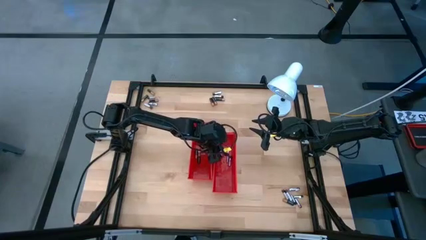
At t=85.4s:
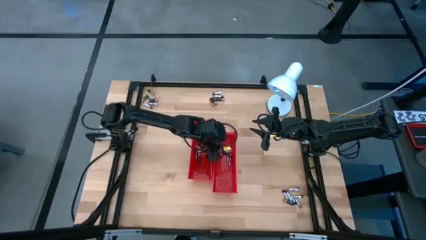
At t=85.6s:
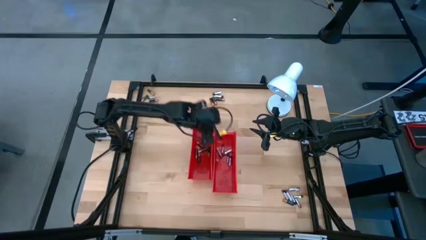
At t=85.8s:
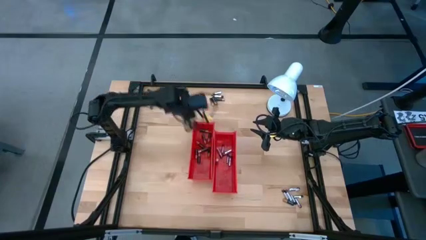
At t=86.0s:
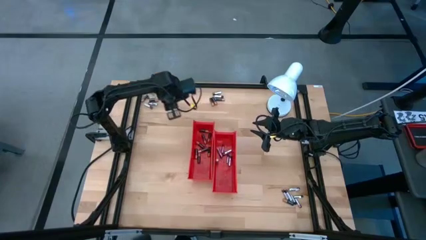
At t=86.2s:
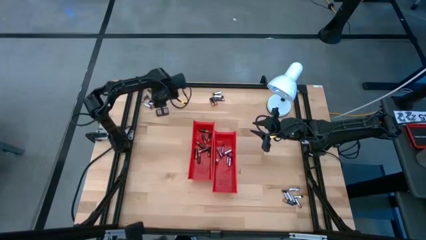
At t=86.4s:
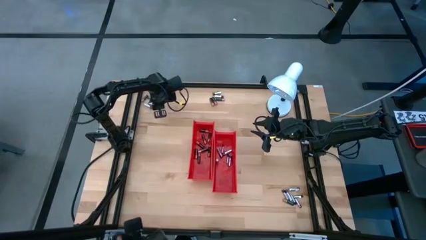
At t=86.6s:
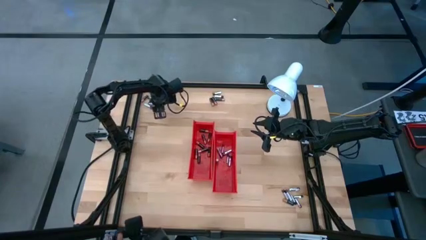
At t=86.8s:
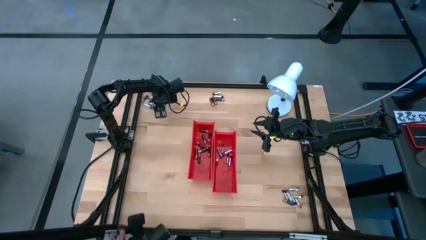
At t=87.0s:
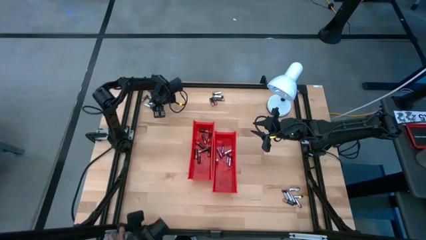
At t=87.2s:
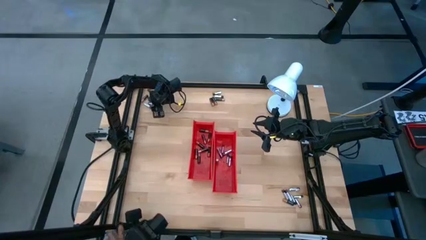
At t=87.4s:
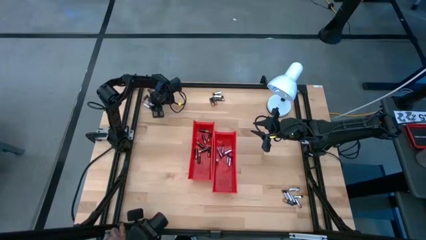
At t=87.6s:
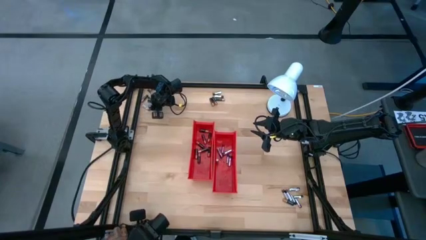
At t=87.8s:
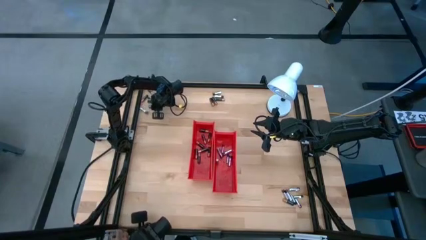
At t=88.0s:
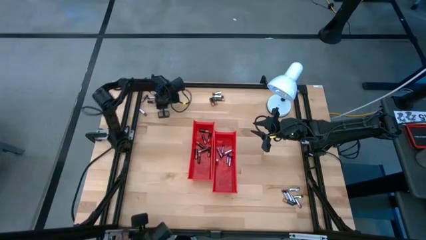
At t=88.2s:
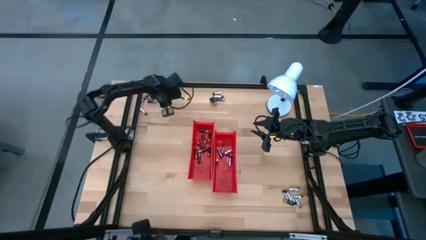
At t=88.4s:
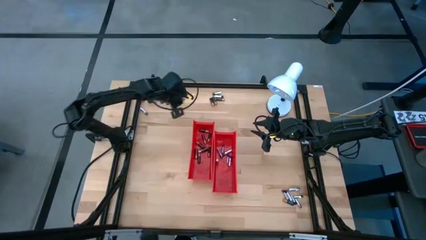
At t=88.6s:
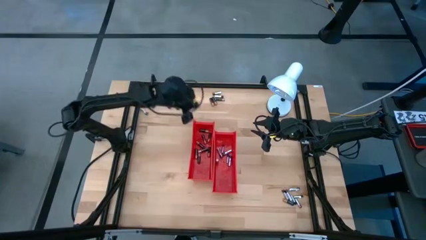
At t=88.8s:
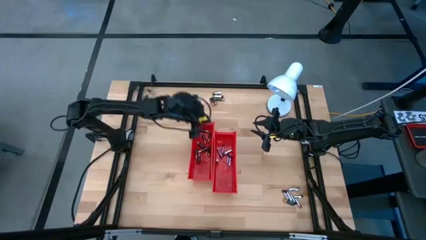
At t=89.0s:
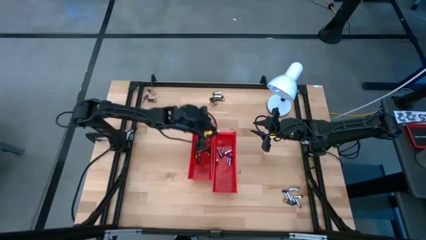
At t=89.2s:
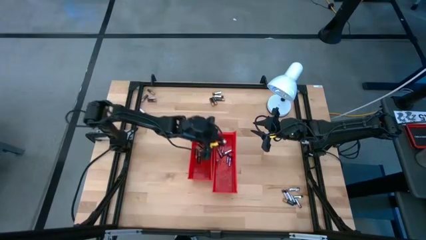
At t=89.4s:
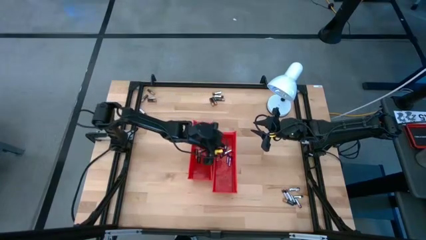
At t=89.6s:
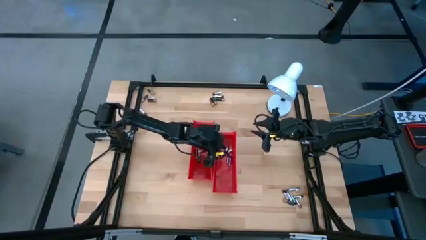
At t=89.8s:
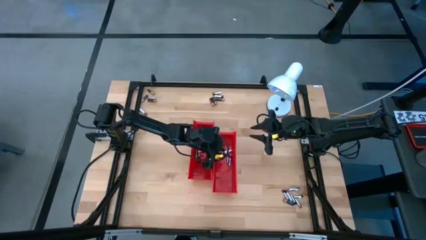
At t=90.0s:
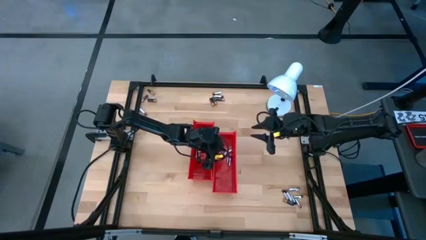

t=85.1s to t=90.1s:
Task: Sort batteries
Put the silver battery into the right red bin

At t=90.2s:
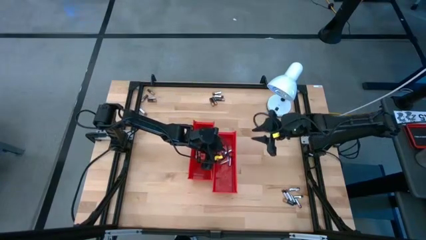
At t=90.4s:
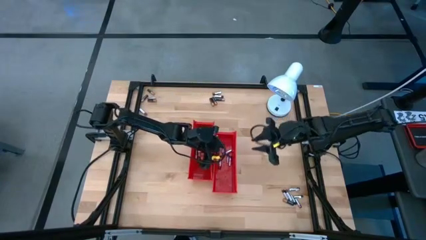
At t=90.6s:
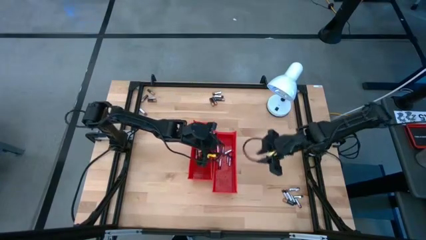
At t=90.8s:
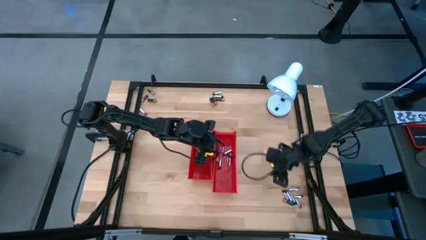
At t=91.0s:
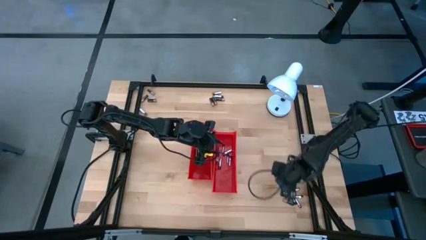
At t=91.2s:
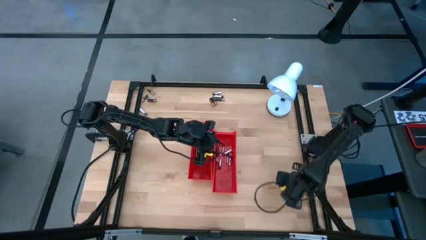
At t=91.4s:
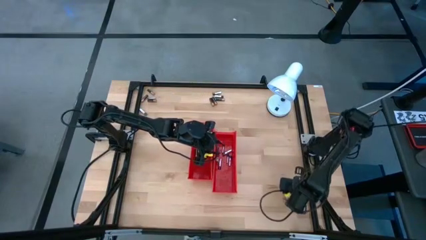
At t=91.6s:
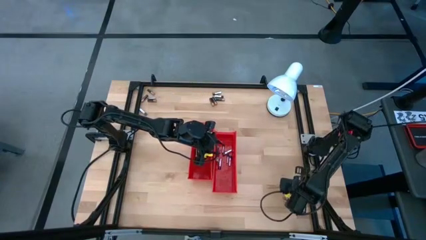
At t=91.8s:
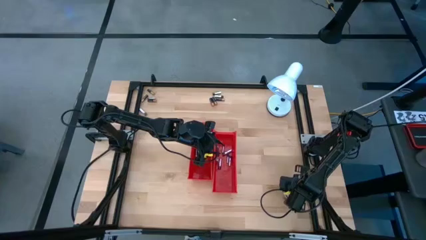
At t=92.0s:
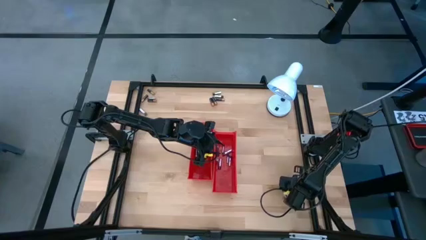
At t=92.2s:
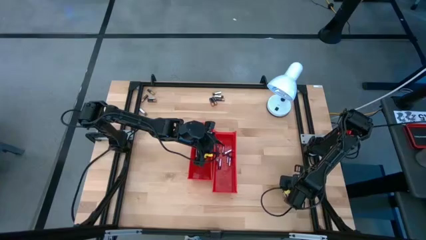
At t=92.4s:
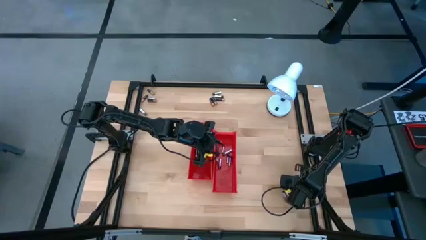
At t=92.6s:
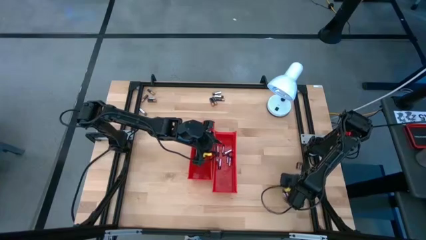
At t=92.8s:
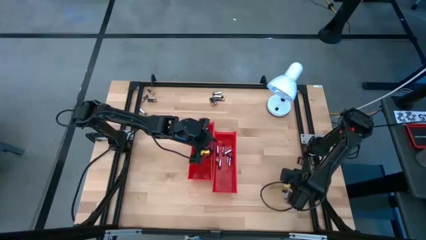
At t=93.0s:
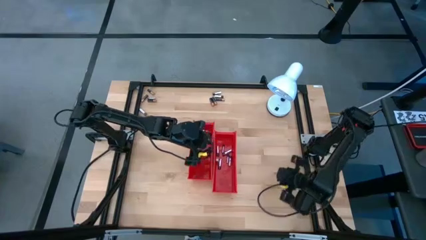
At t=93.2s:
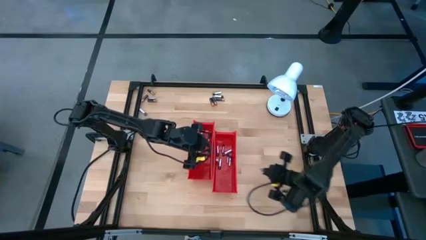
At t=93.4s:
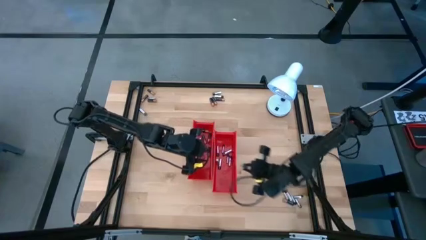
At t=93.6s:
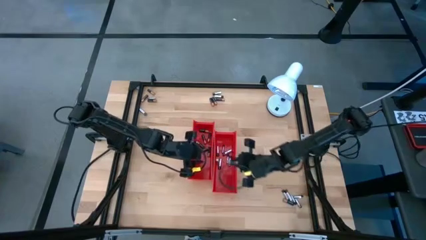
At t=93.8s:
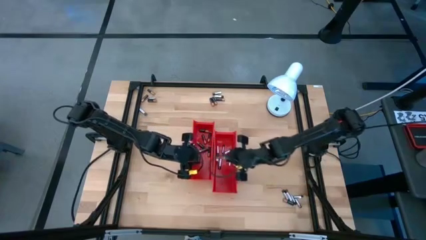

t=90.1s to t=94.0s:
Put the silver battery into the right red bin

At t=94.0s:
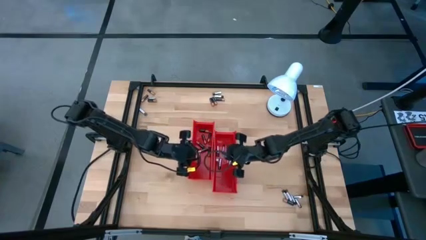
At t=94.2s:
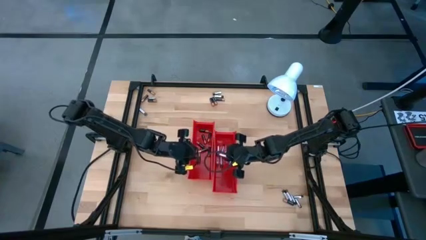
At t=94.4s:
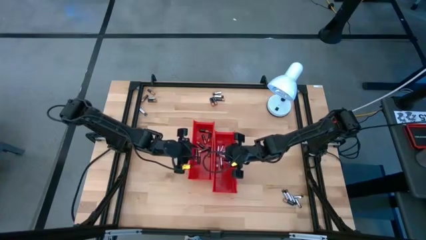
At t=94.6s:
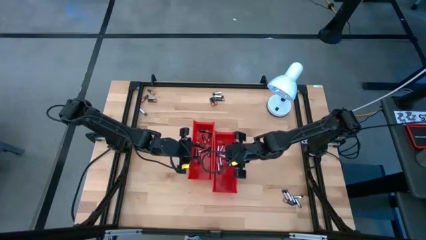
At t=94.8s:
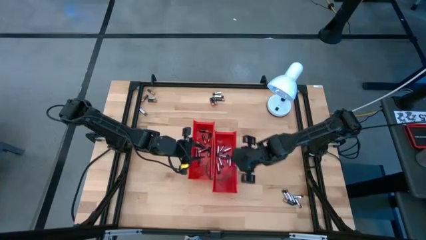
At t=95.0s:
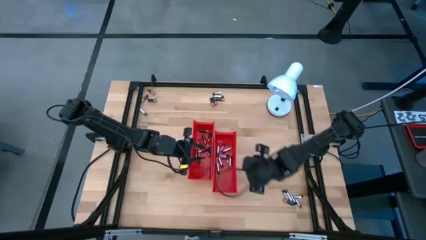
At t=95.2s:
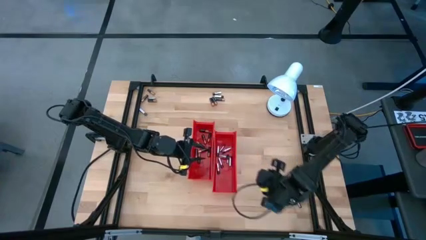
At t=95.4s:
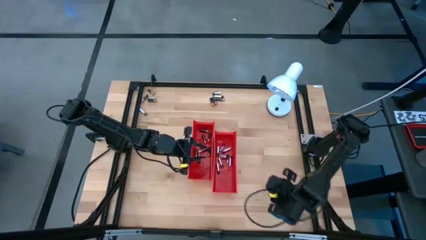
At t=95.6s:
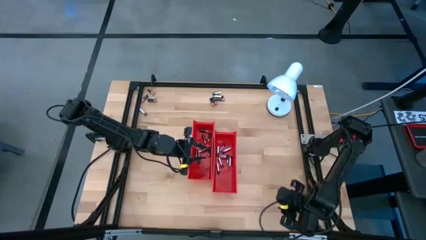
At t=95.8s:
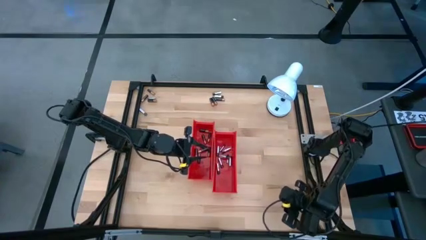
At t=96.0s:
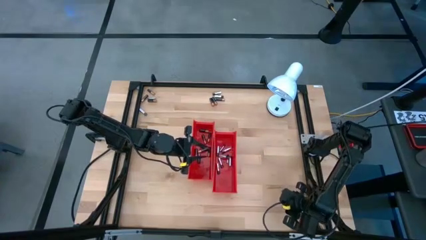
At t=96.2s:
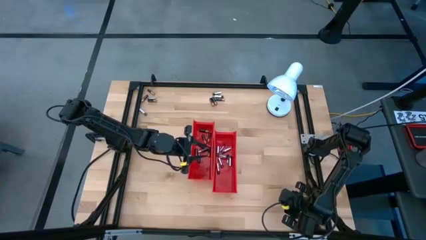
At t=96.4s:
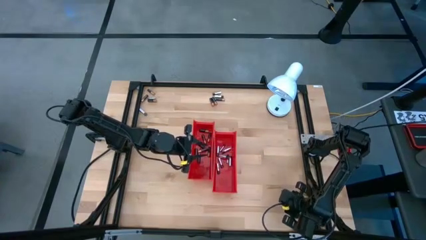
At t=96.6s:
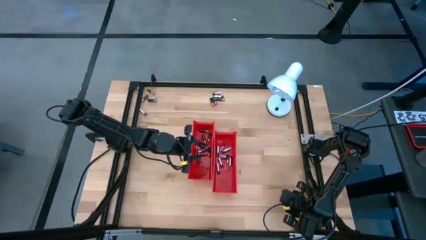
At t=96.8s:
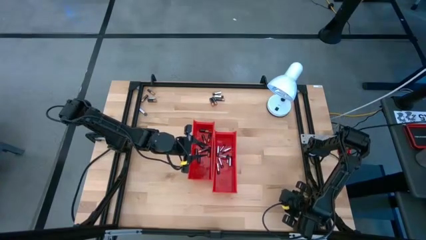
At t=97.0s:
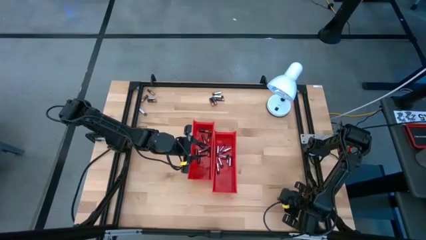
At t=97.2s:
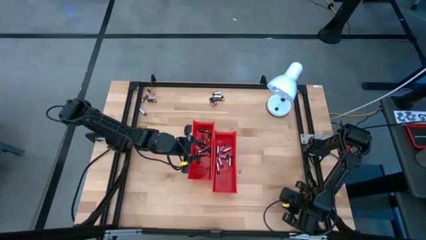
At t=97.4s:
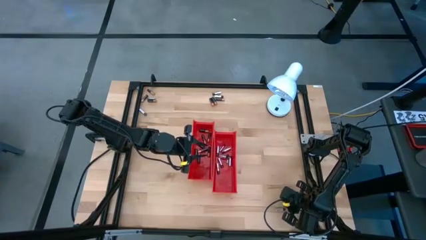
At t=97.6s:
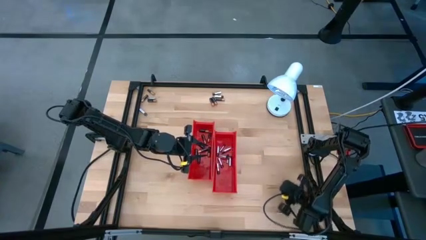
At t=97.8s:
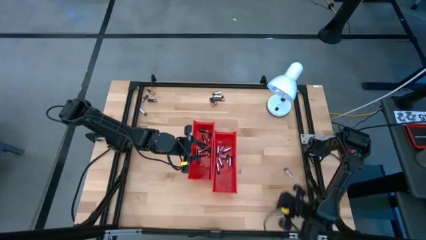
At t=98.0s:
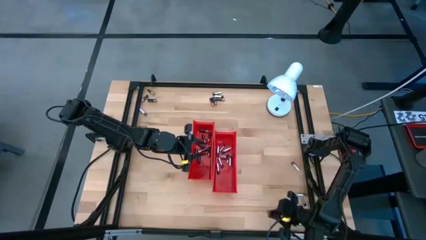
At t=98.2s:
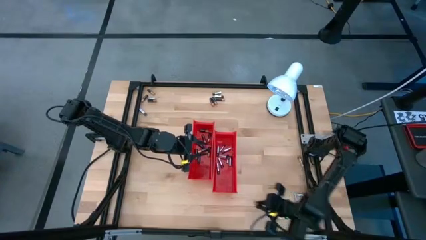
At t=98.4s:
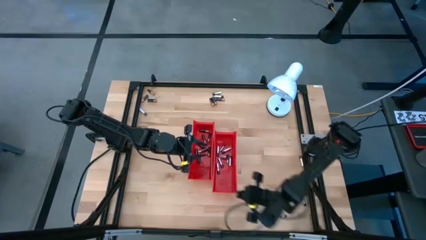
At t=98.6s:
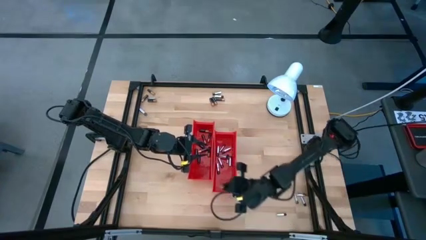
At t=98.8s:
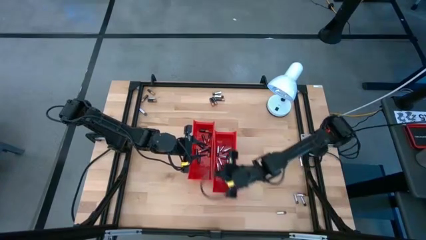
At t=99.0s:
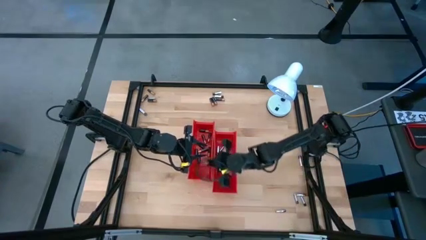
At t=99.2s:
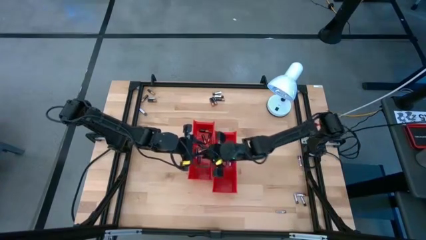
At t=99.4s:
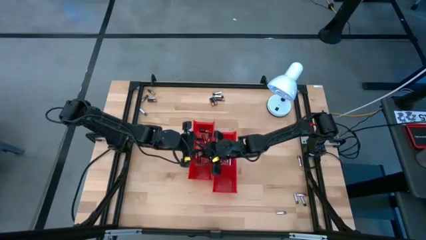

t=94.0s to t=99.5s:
Put the black battery into the left red bin

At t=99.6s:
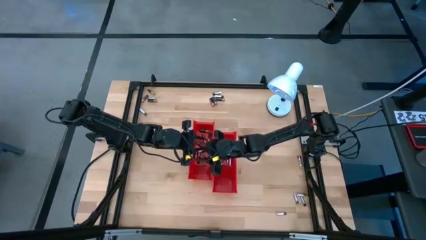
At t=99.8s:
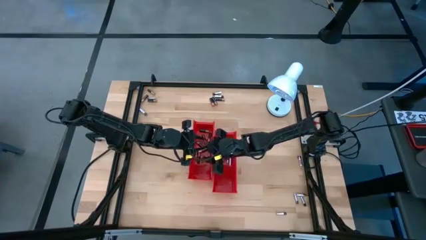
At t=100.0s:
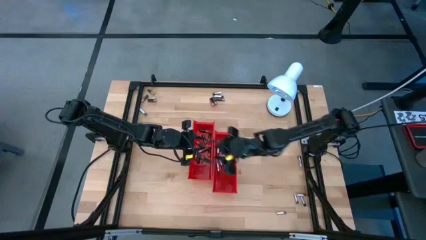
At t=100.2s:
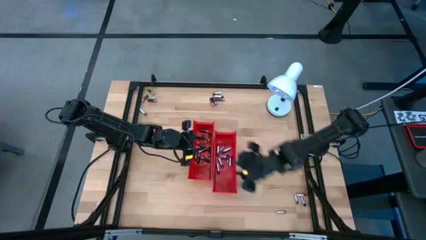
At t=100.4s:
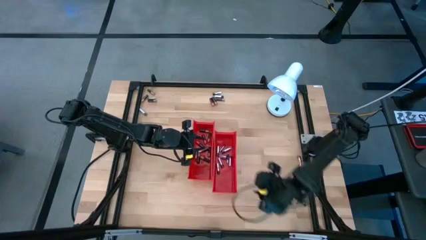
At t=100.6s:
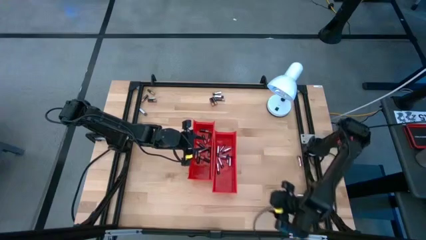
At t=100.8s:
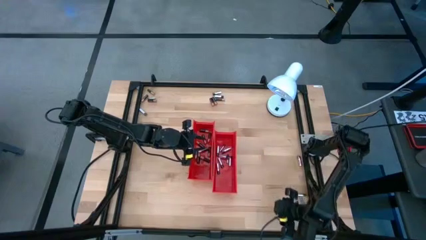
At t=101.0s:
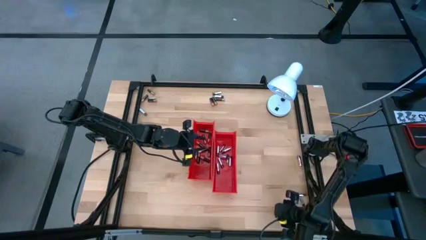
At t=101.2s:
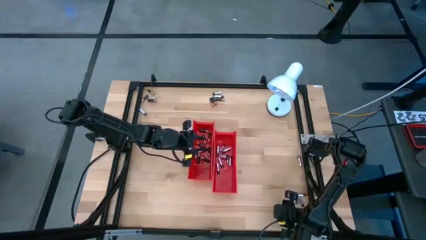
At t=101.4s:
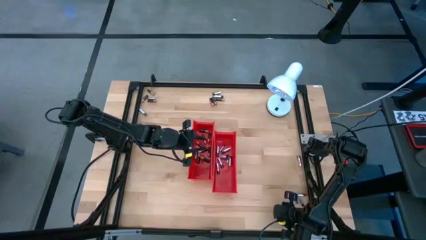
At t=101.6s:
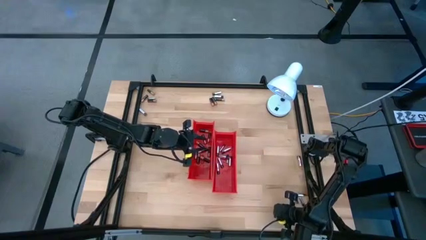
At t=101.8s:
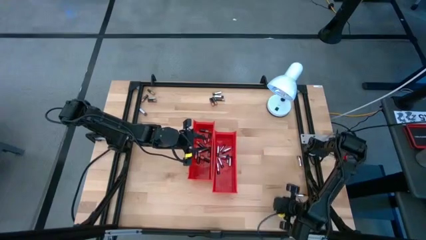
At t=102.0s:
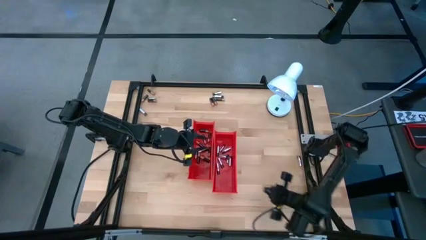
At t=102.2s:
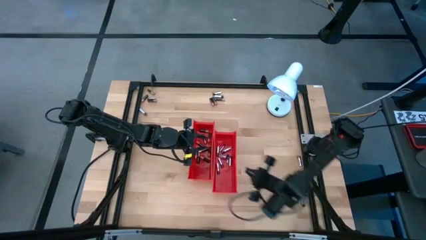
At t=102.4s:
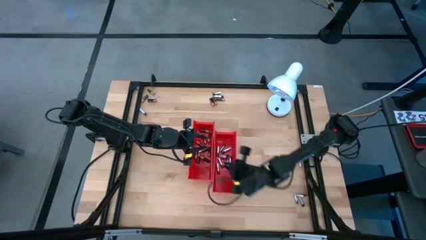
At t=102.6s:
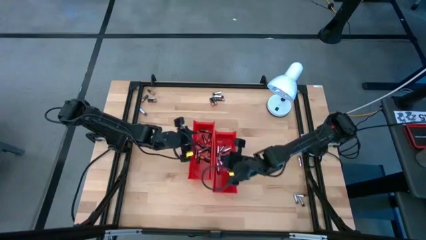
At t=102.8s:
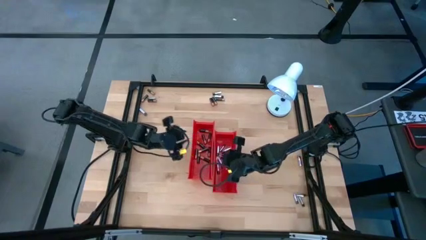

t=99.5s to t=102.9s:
Put the silver battery into the right red bin
